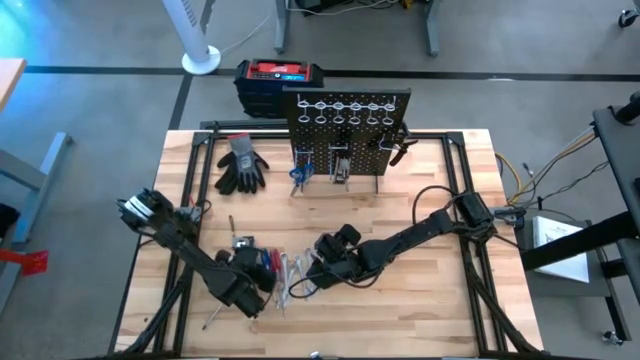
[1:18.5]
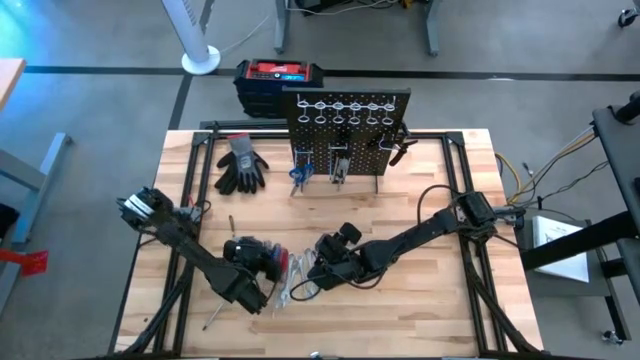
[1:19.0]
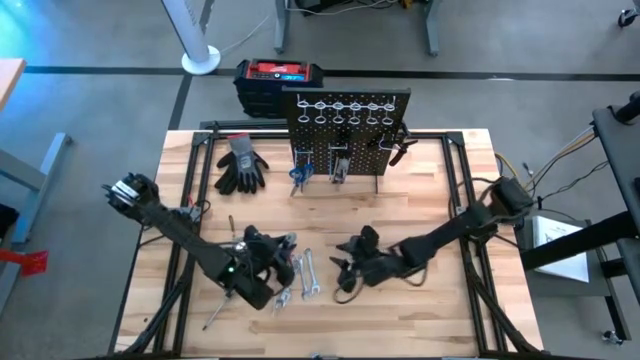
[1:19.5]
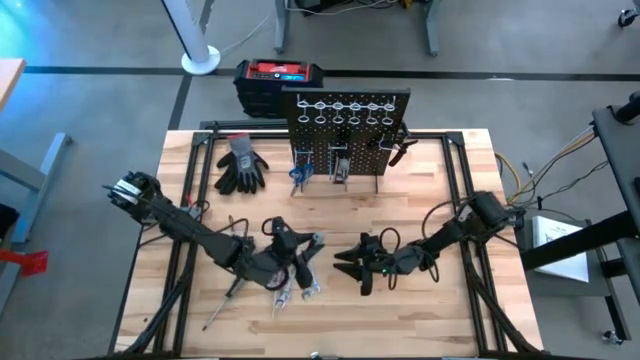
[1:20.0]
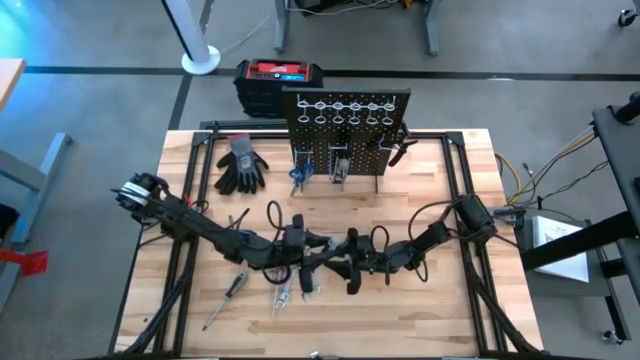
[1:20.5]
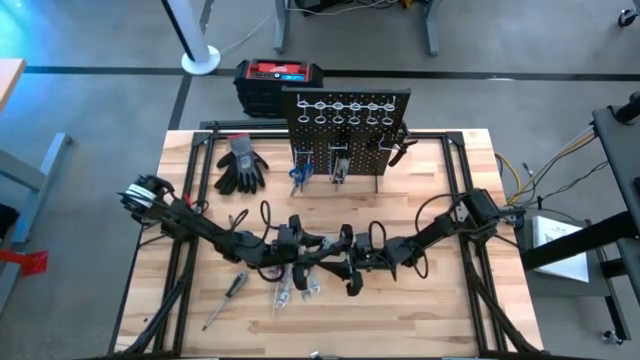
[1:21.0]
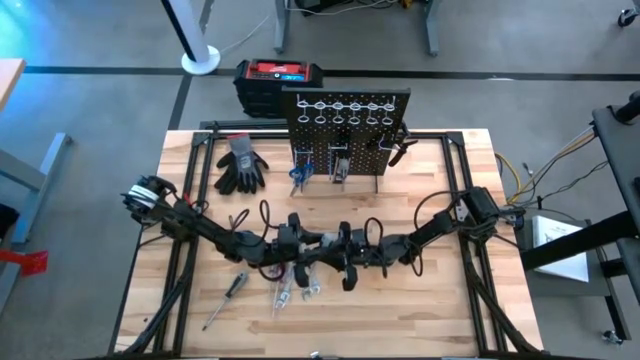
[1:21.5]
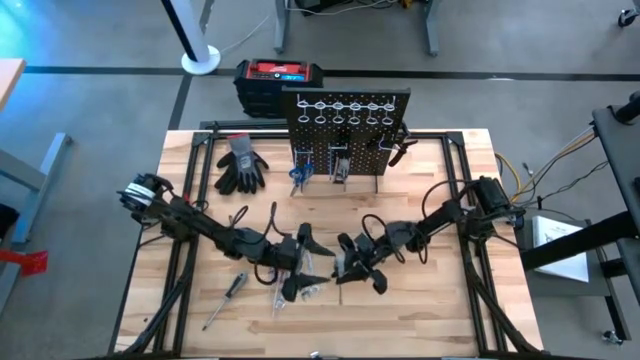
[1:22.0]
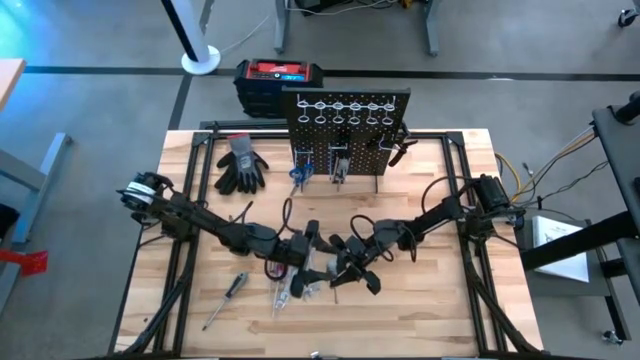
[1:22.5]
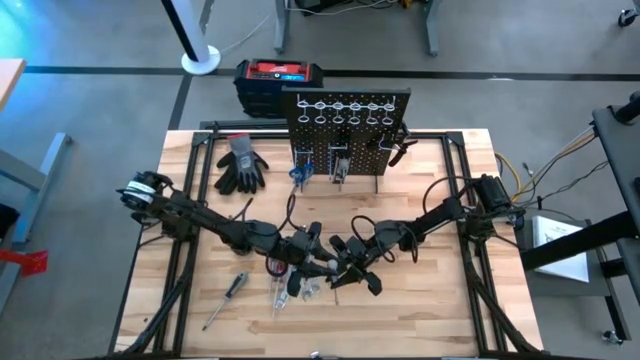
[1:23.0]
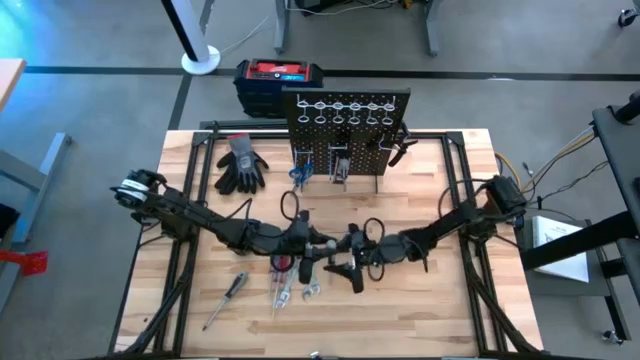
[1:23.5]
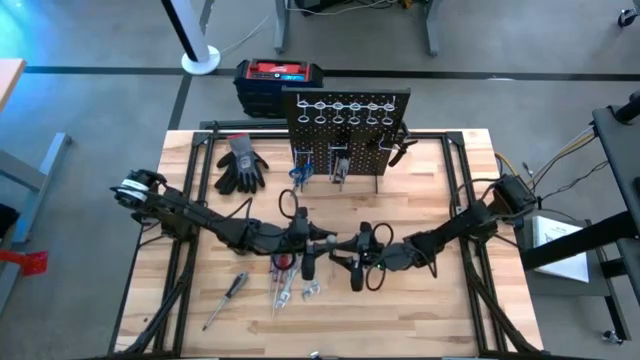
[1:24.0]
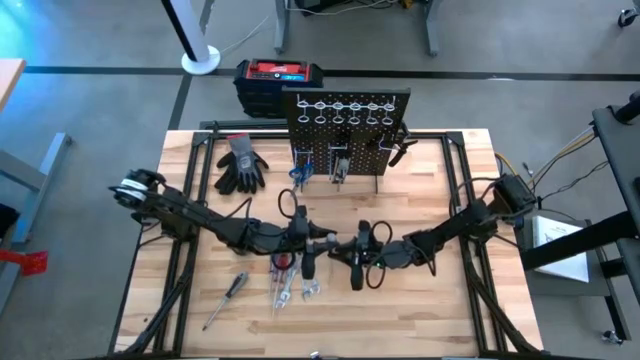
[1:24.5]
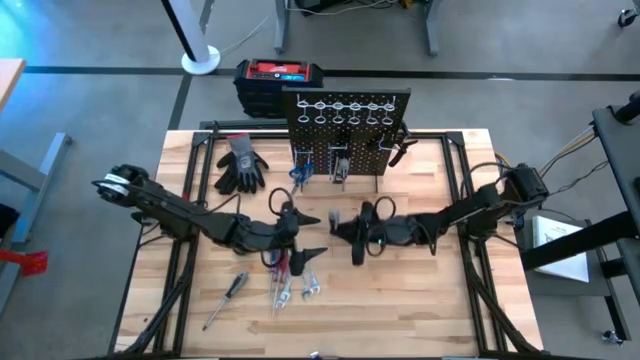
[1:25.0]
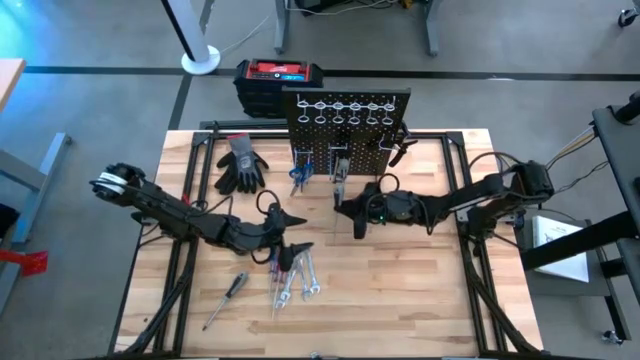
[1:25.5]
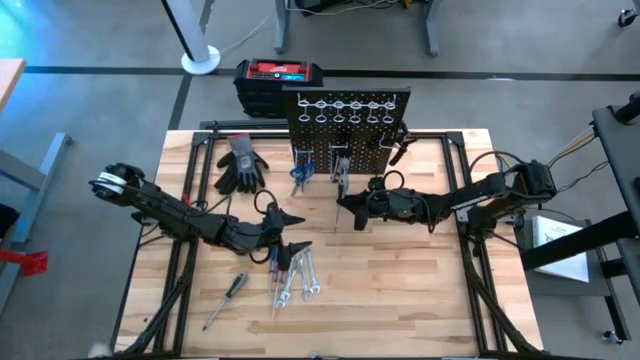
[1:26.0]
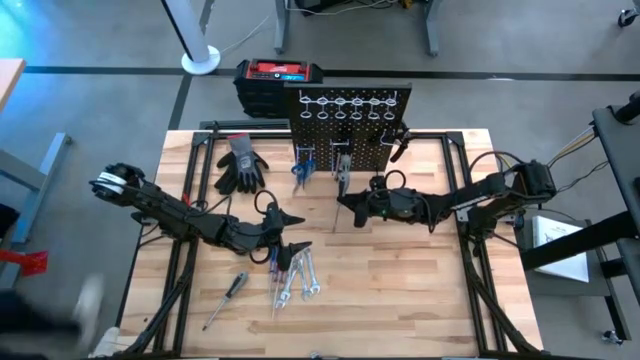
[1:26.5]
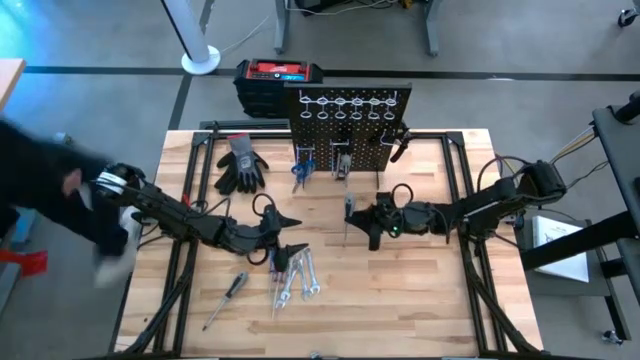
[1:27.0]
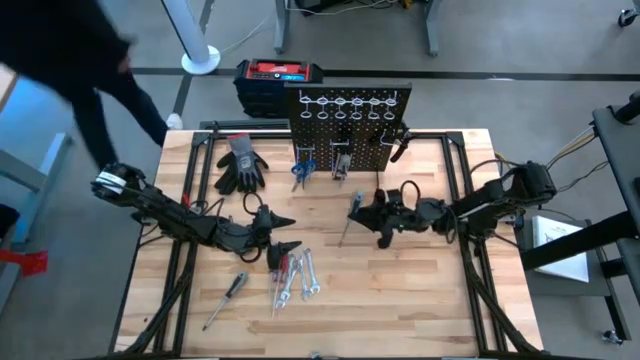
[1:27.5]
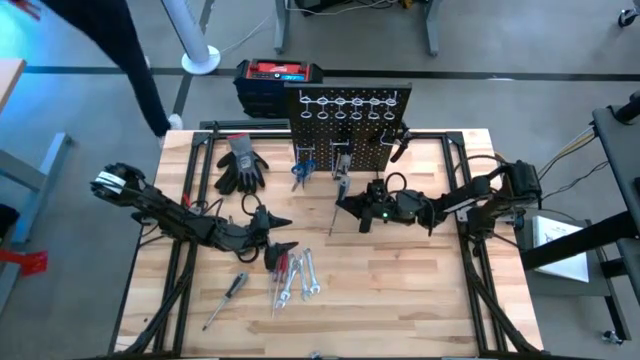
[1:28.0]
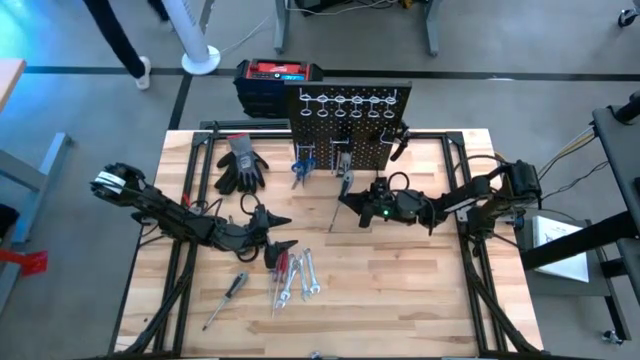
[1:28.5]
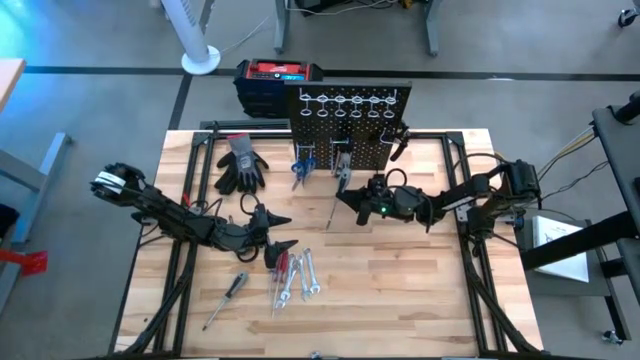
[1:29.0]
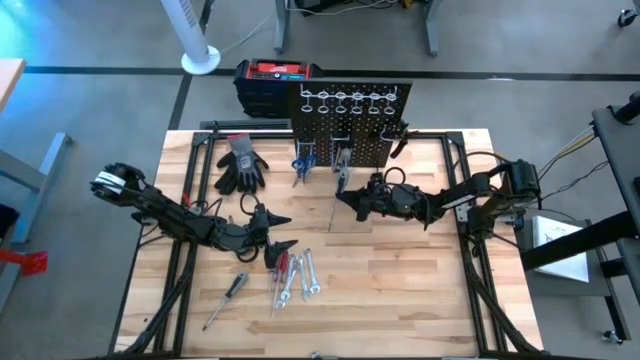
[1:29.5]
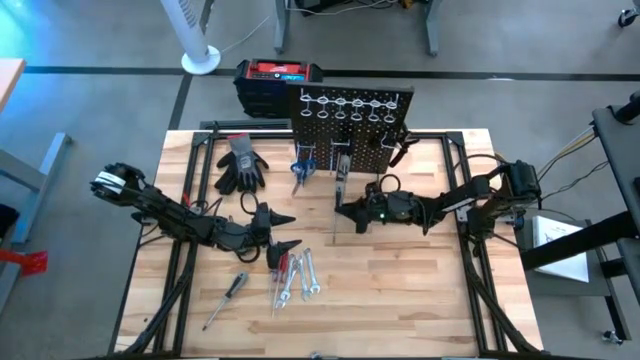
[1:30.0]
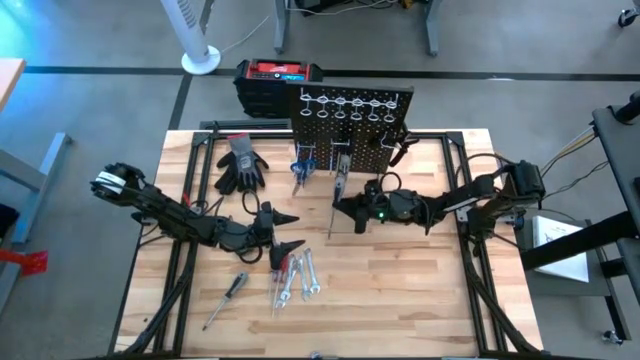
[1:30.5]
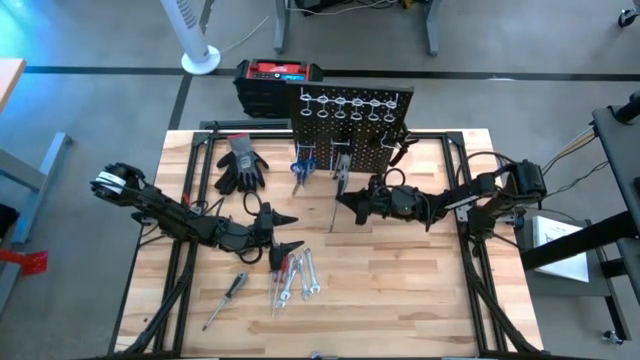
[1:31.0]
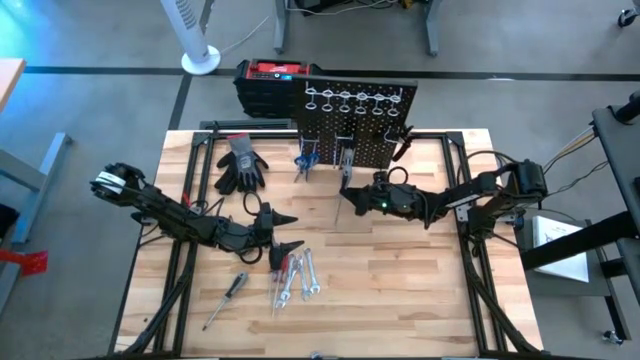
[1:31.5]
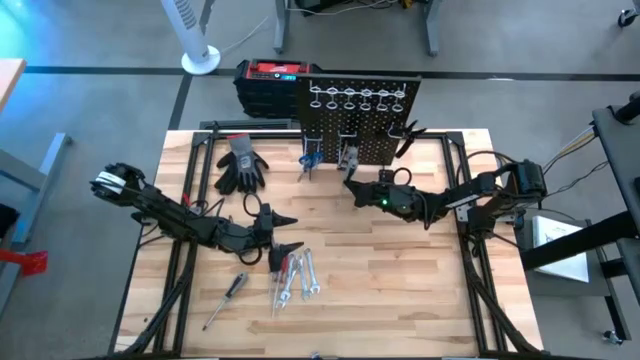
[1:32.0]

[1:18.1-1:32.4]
Task: Hang tools onto peg board
Hang the grey screwdriver on the pegboard

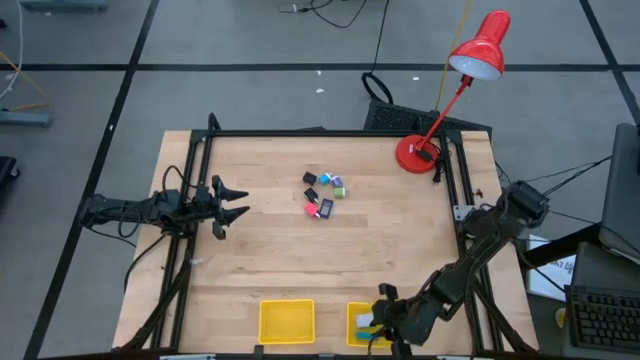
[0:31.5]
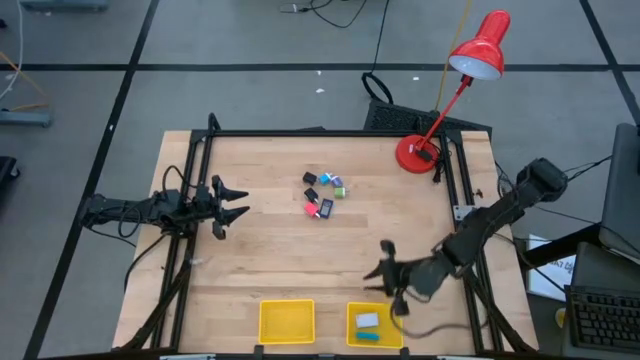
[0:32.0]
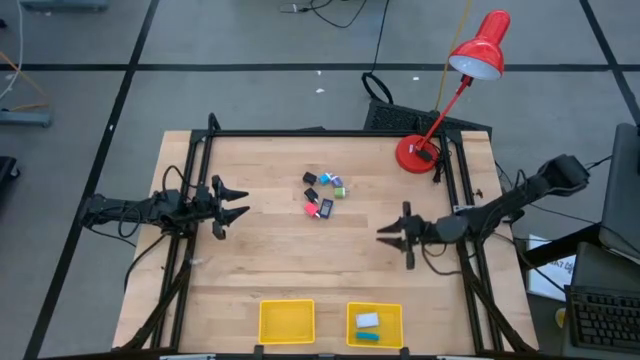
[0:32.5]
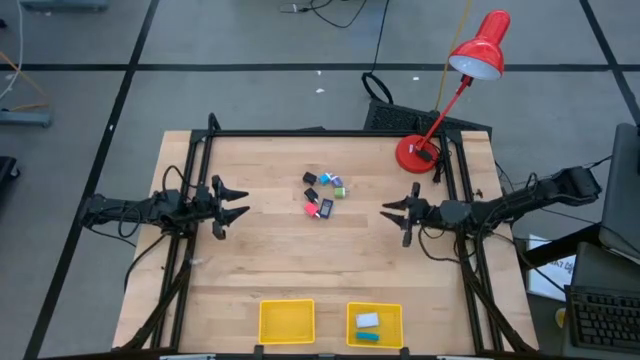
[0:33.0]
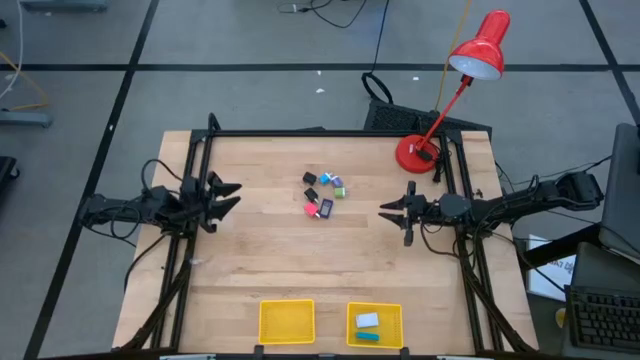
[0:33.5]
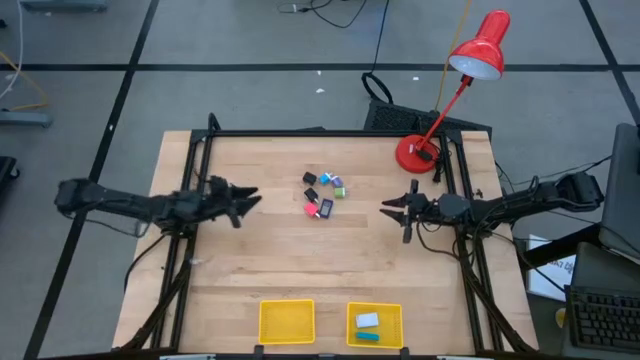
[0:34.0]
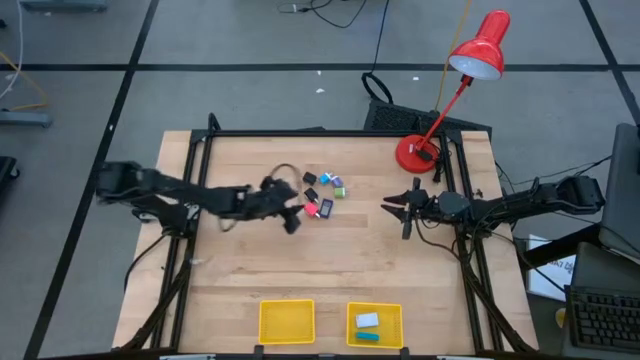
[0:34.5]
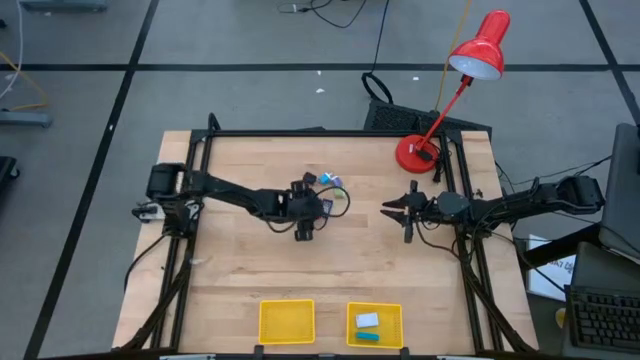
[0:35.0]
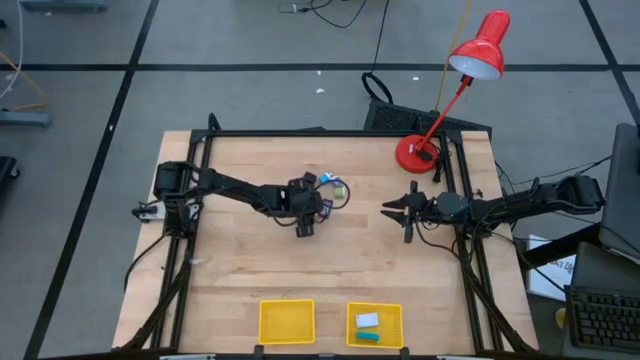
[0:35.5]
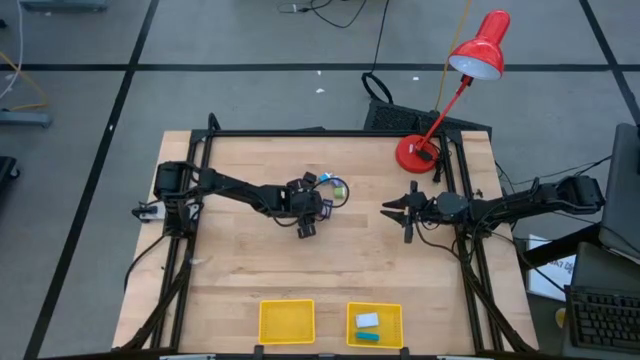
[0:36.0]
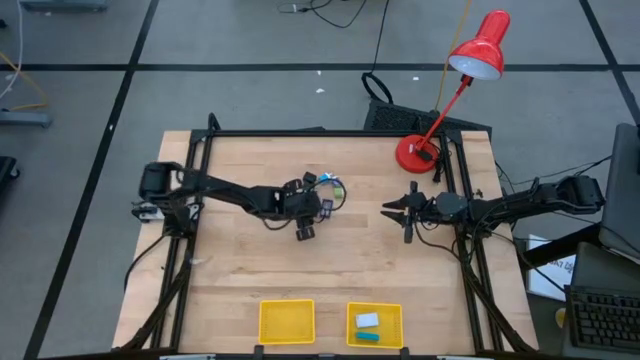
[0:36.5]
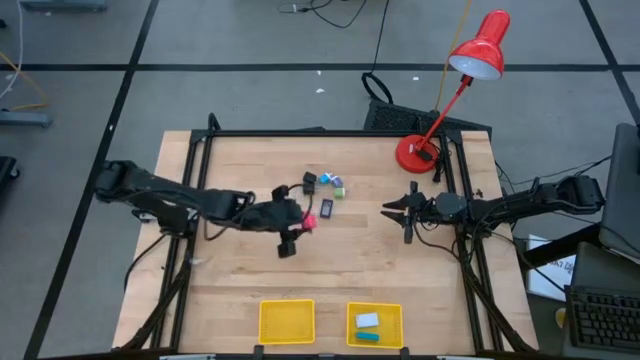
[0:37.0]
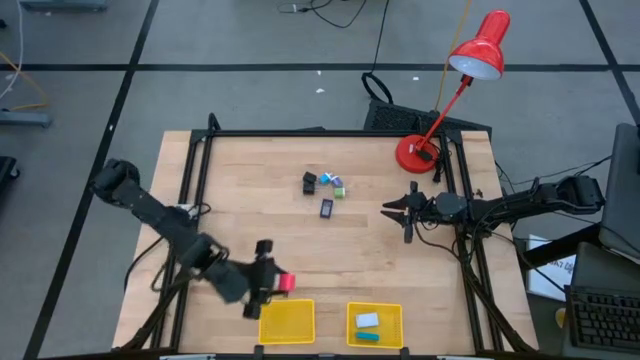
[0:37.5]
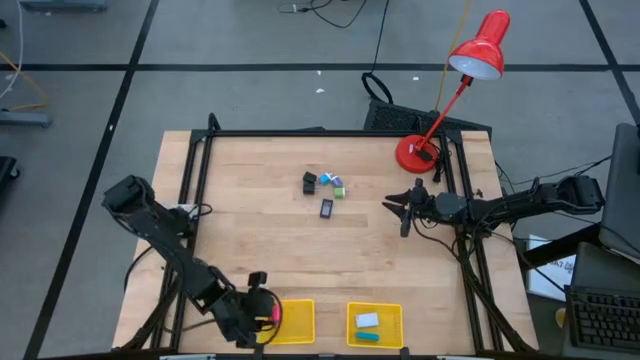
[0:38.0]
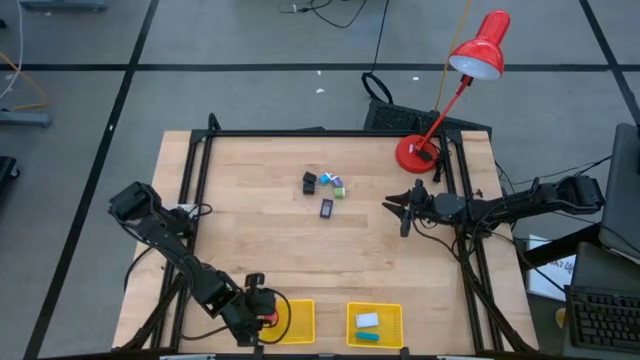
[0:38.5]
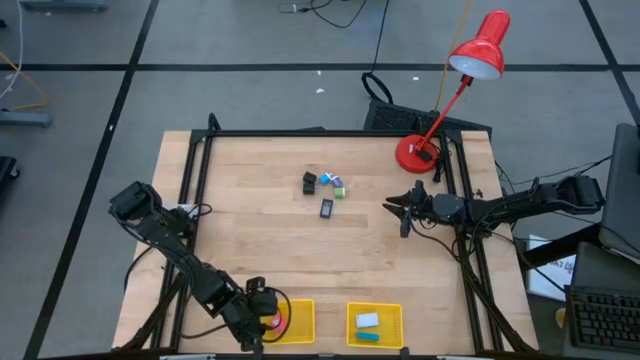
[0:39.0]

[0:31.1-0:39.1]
Task: Pick & Place Office items
Put the pink adapter into the left yellow bin
